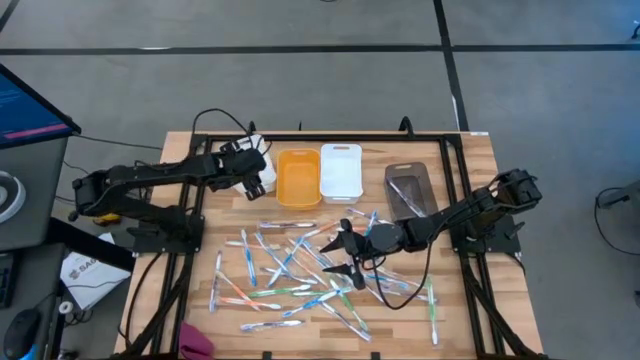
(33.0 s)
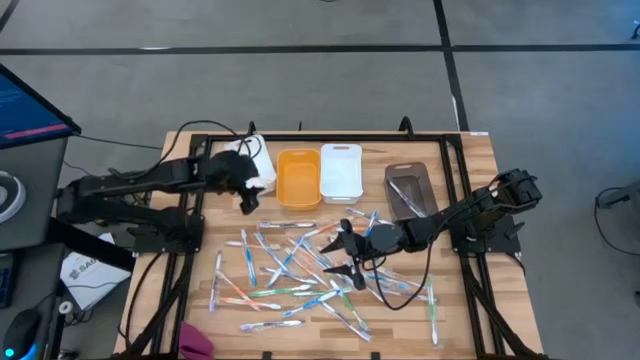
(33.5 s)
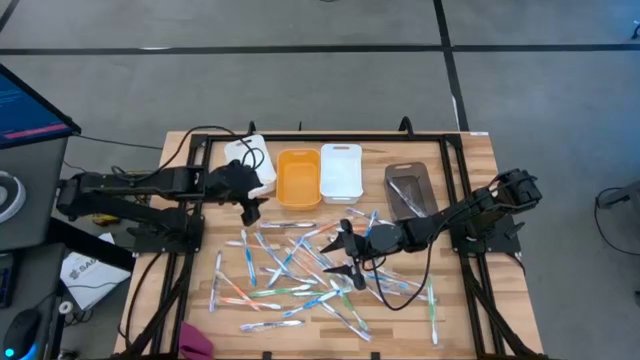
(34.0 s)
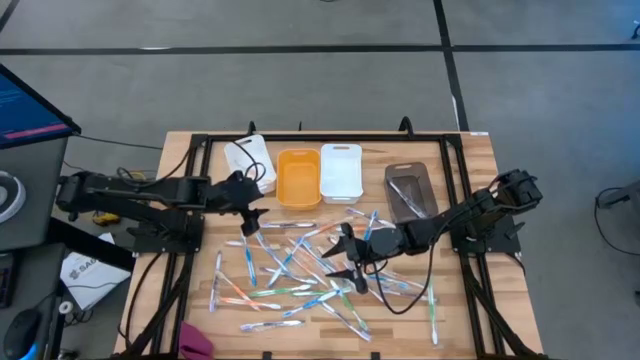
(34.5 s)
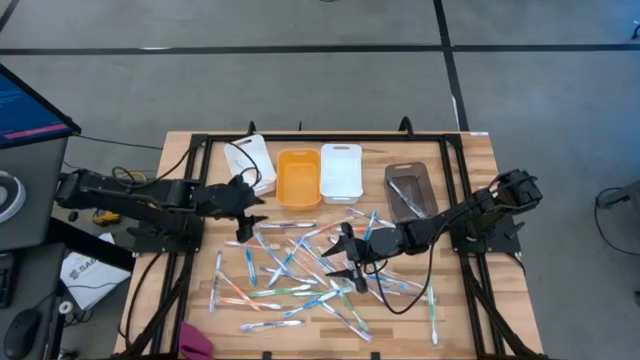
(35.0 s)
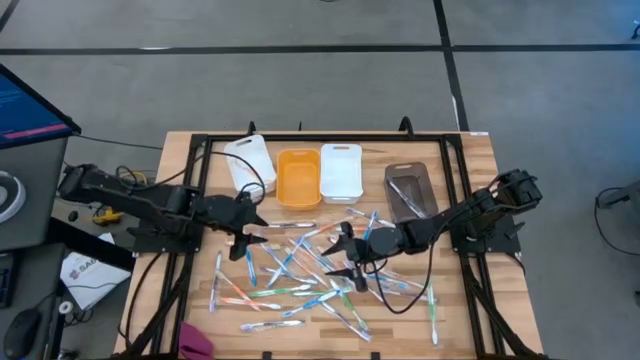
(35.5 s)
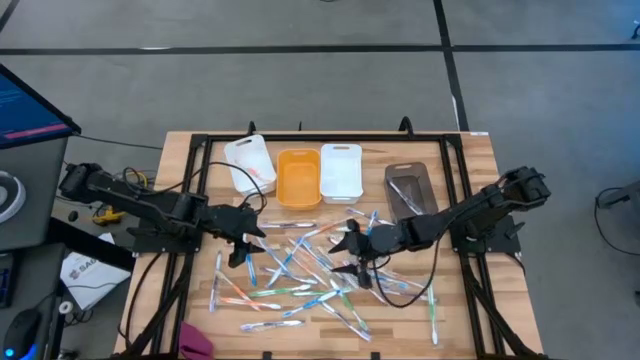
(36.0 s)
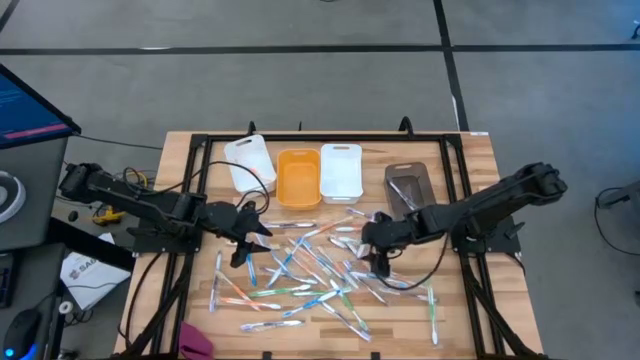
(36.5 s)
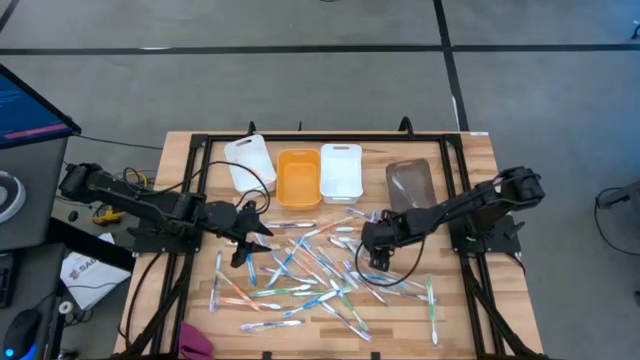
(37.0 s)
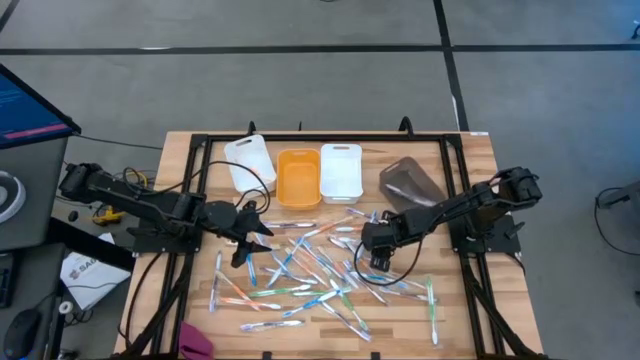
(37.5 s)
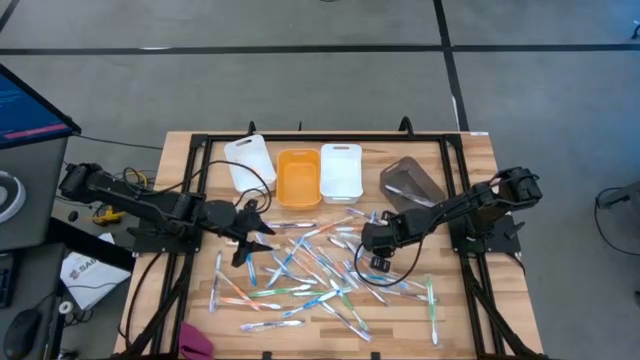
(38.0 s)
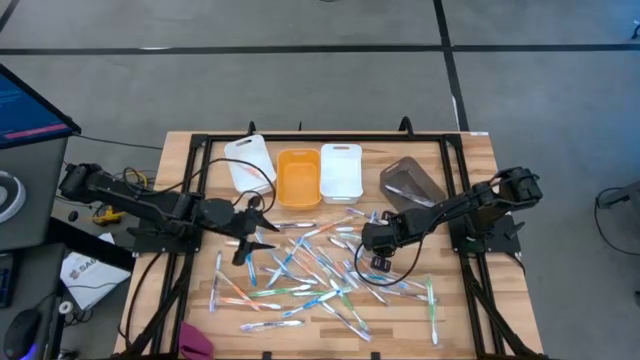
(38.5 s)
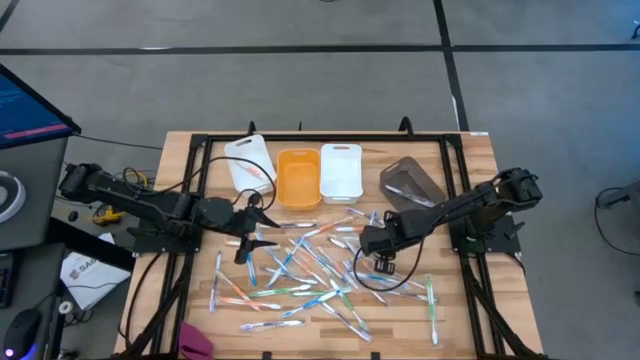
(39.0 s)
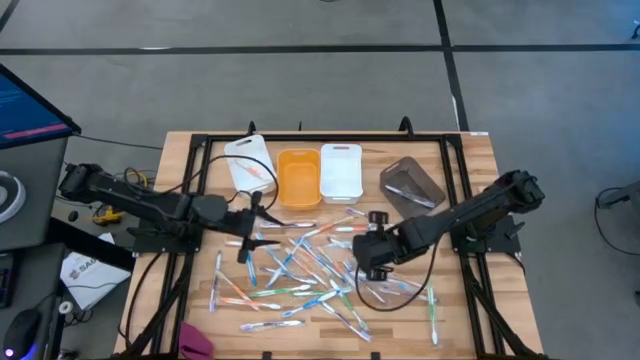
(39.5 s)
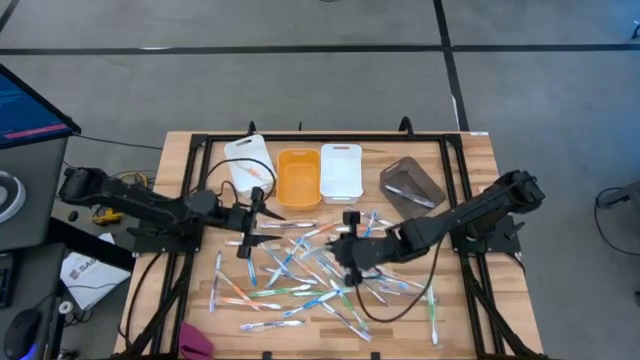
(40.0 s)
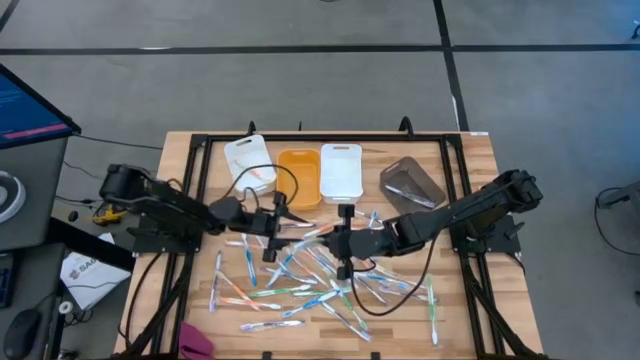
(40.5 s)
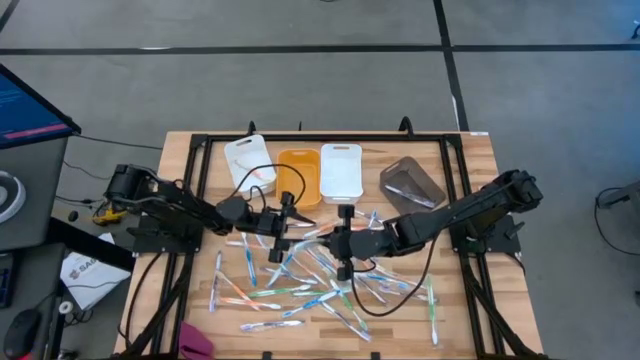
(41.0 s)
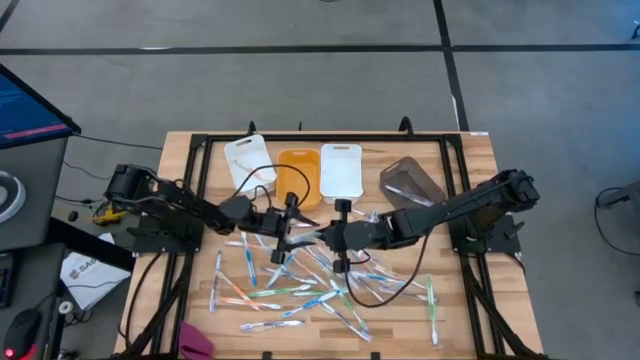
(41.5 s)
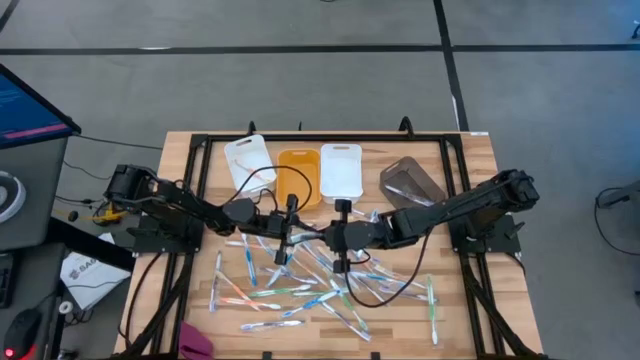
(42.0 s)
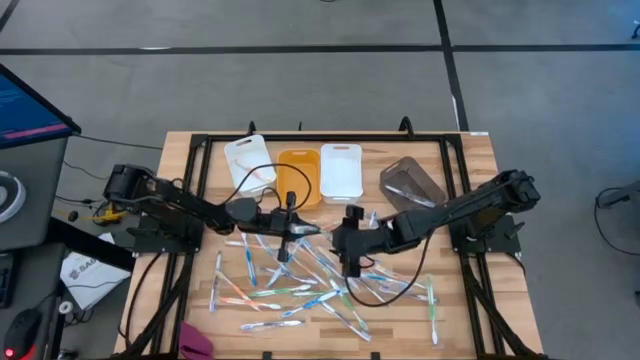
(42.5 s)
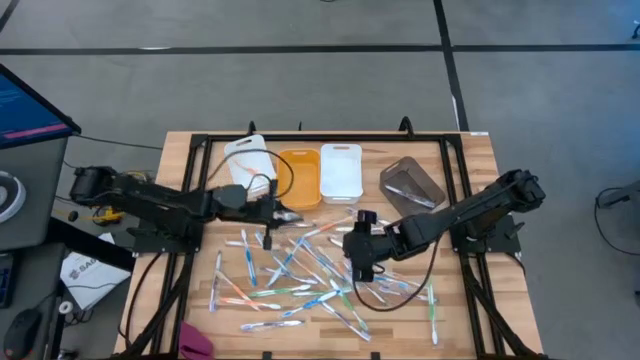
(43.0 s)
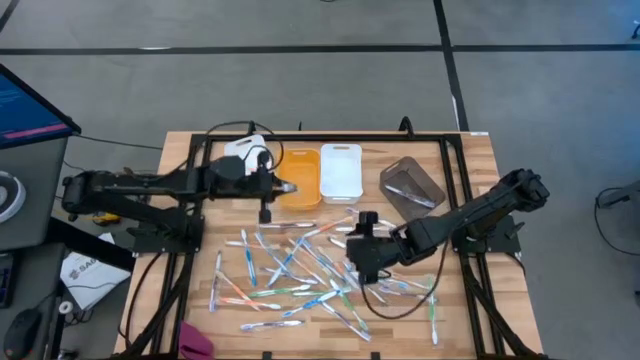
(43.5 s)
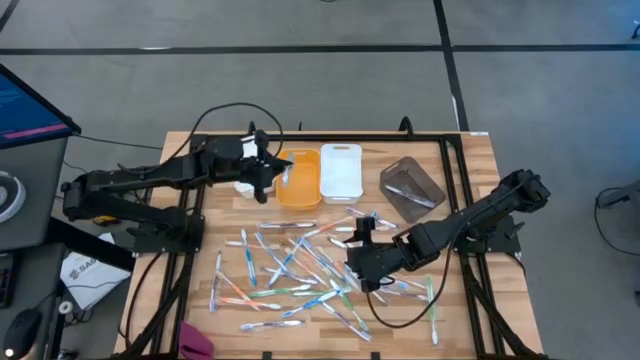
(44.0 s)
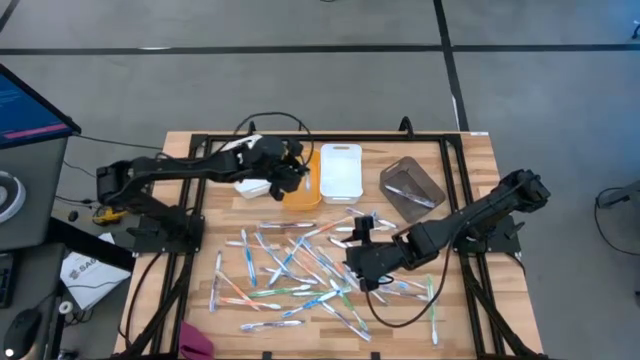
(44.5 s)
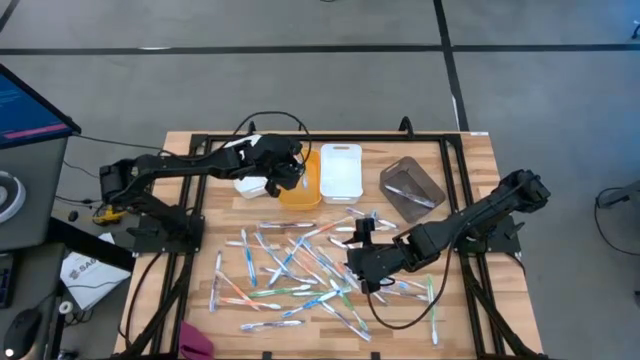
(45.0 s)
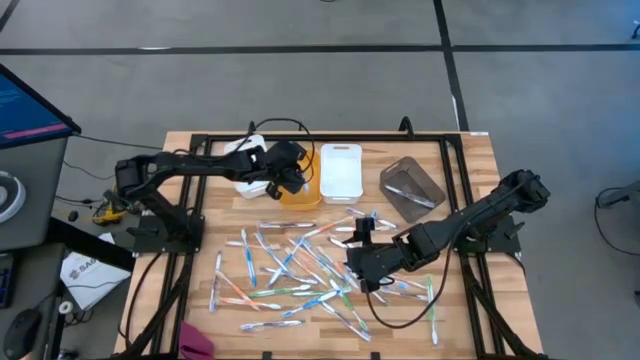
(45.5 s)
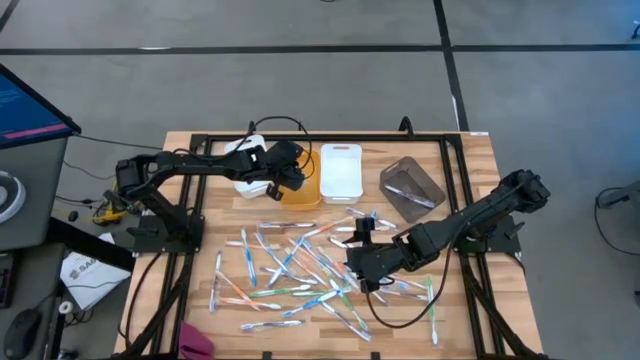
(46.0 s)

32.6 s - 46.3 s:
Task: Pick & Place Toothbrushes
Put the white green toothbrush into the yellow bin

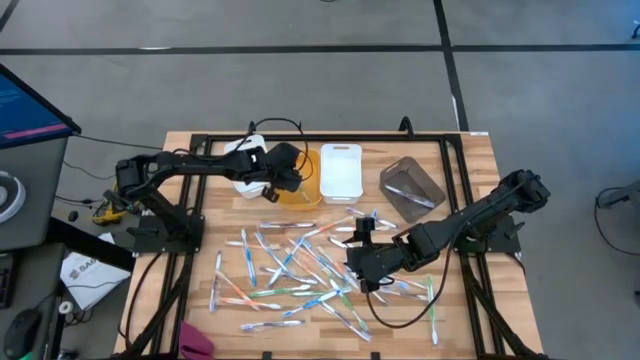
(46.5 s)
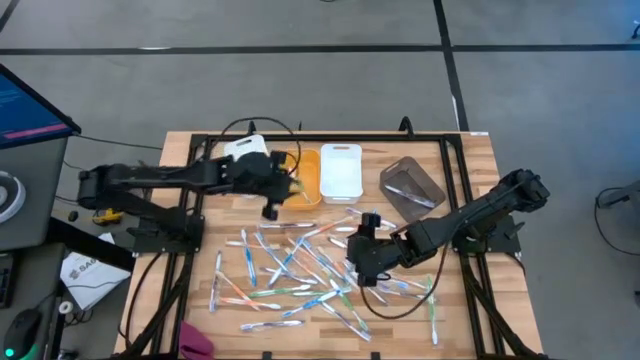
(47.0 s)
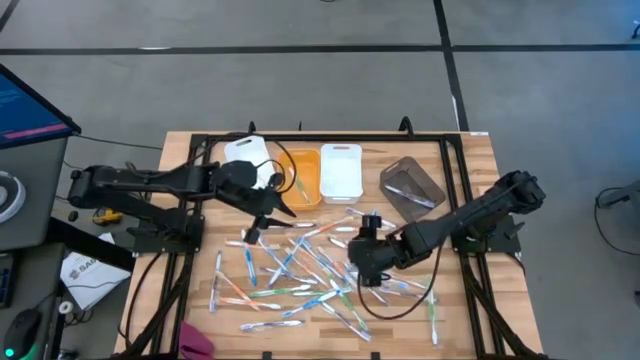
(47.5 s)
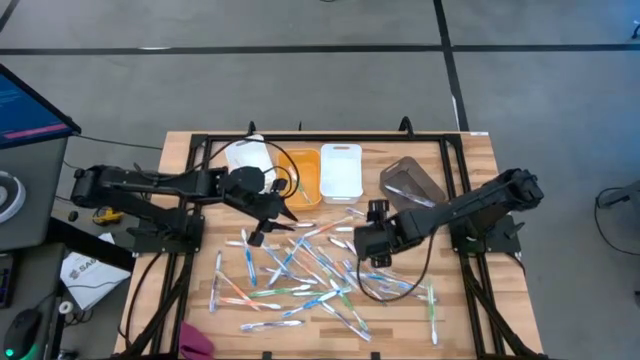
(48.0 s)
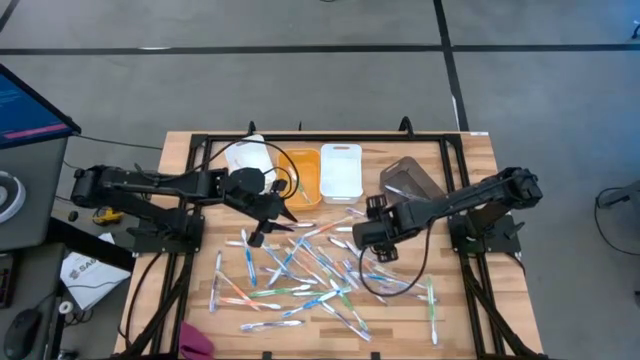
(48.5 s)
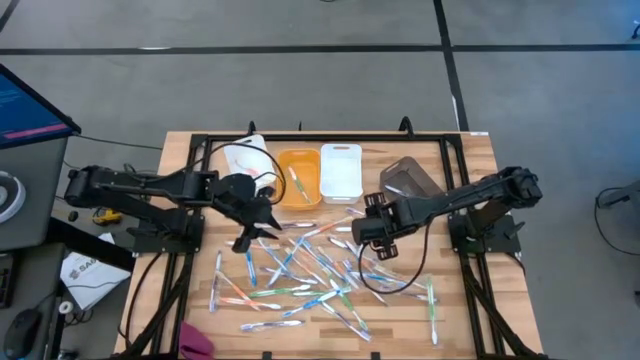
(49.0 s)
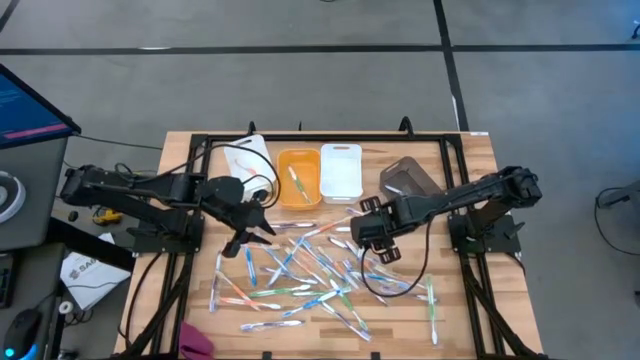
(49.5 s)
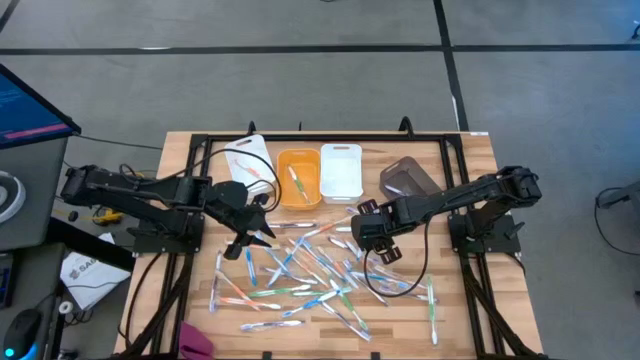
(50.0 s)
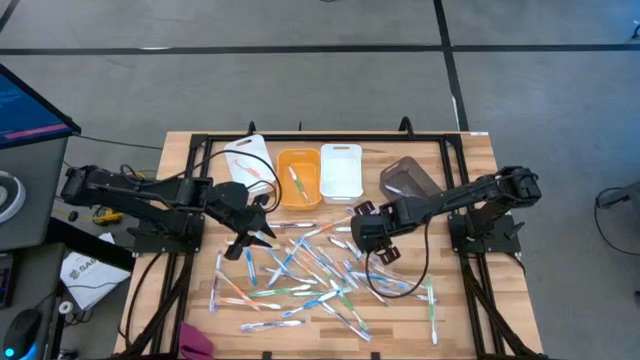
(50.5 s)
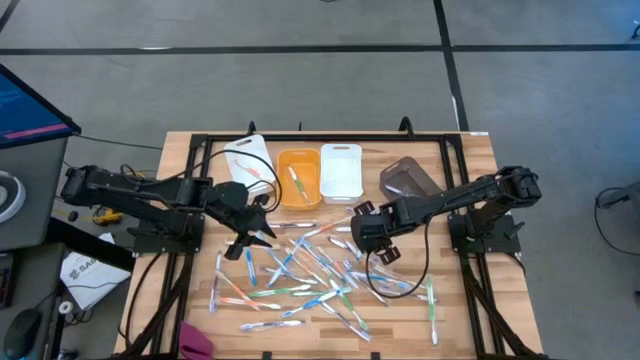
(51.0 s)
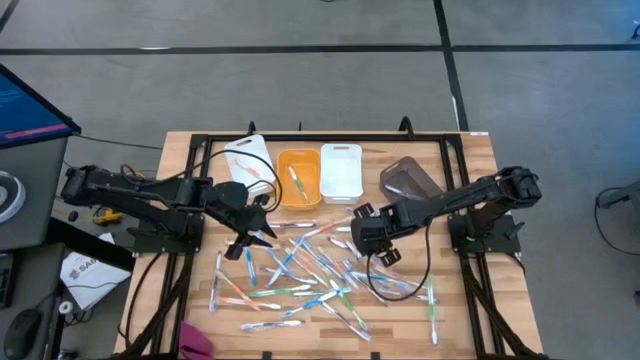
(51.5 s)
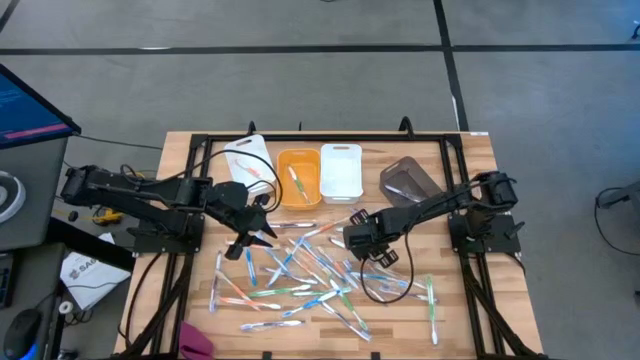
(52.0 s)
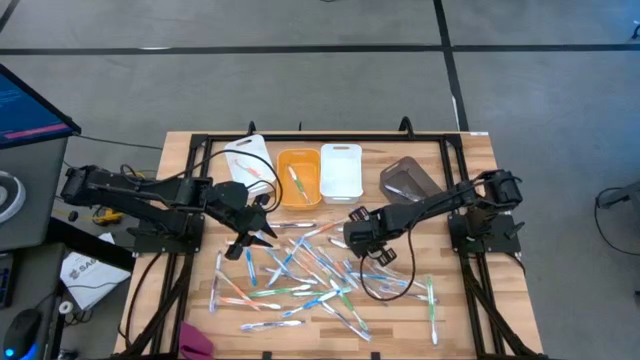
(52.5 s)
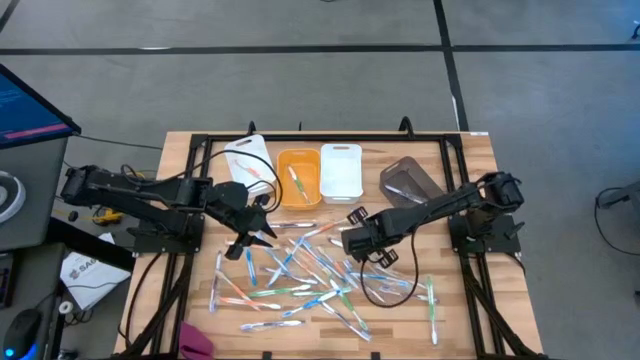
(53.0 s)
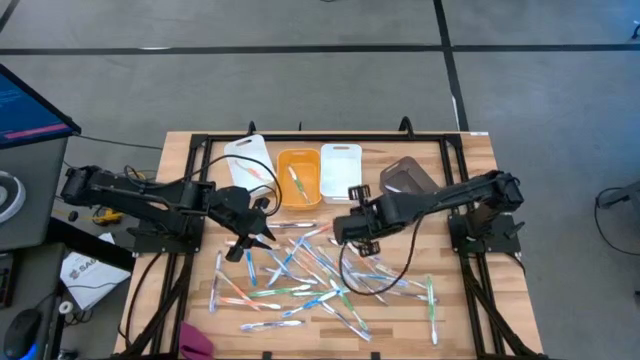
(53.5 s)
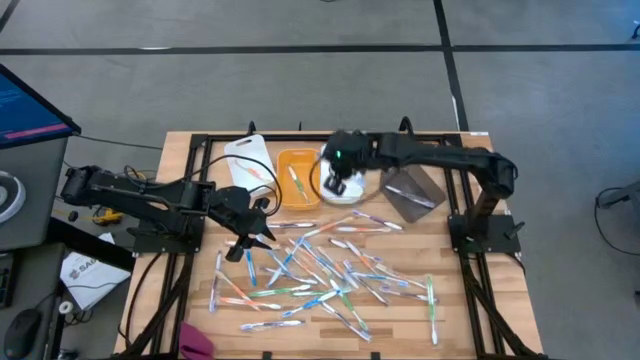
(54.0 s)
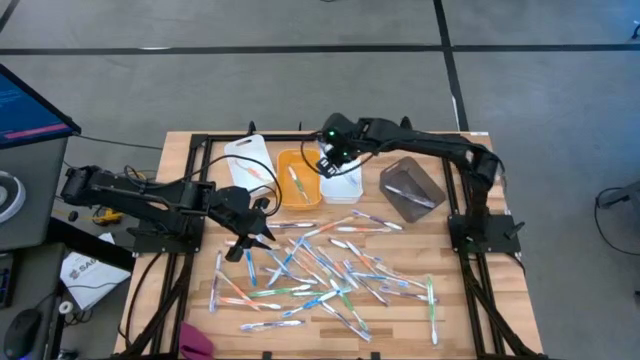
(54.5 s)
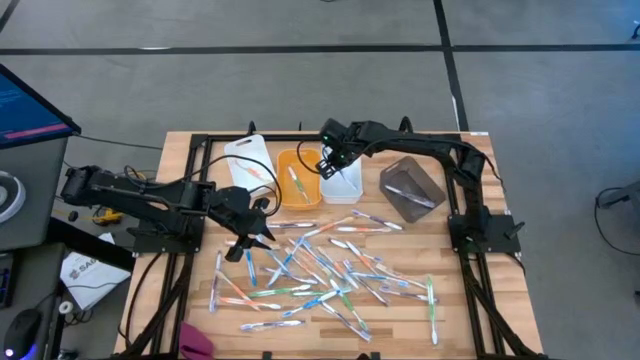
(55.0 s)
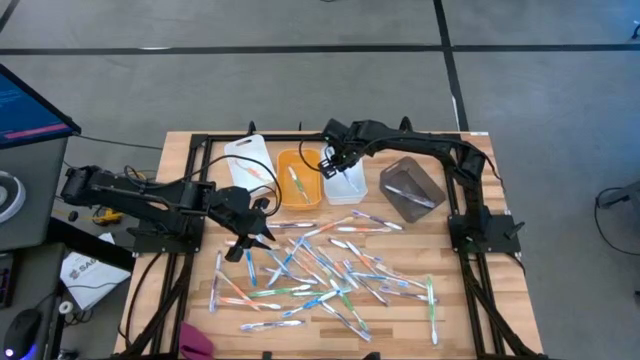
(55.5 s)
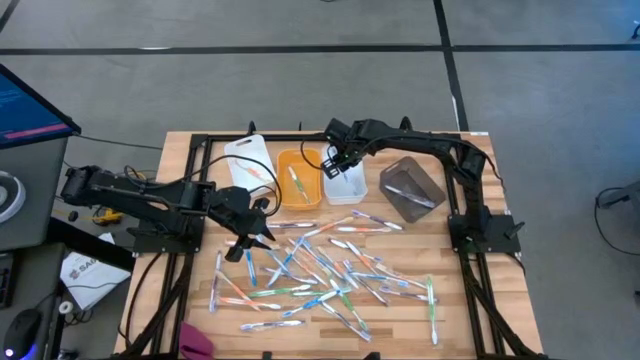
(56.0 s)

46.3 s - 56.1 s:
Put the white blue toothbrush into the right white bin
